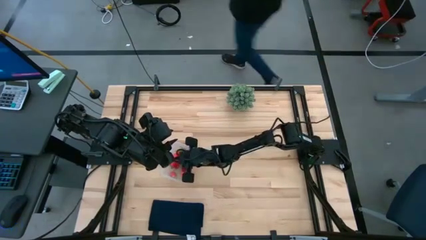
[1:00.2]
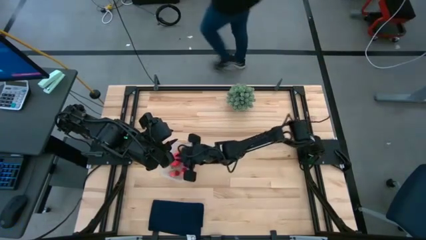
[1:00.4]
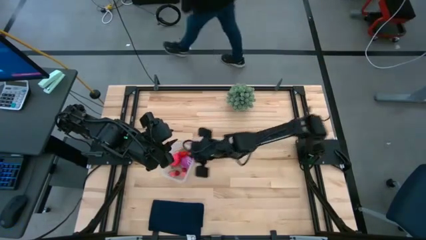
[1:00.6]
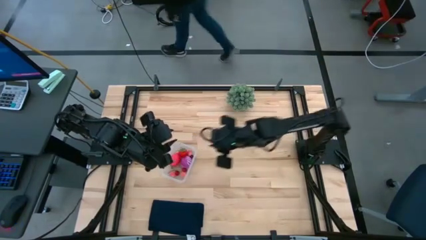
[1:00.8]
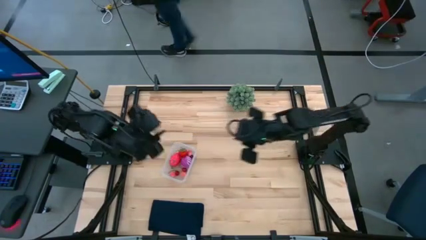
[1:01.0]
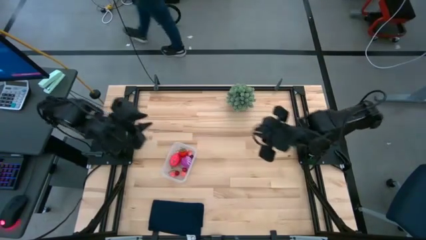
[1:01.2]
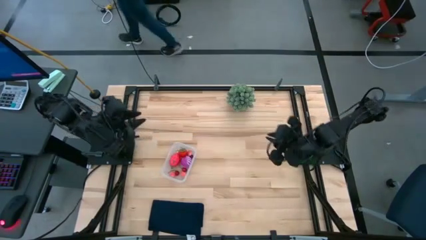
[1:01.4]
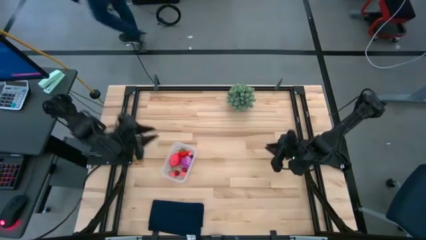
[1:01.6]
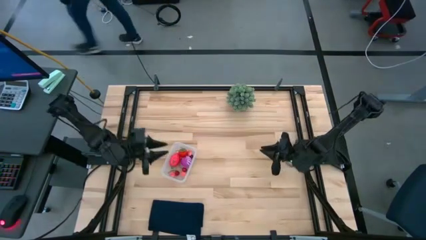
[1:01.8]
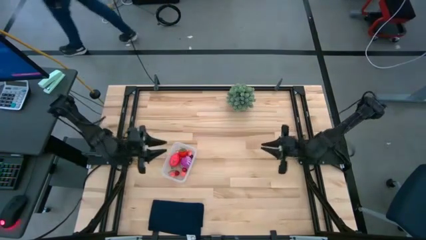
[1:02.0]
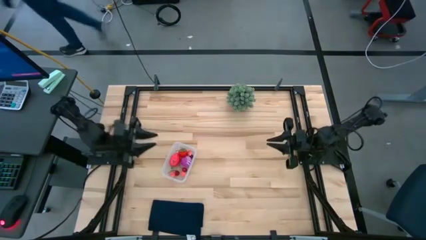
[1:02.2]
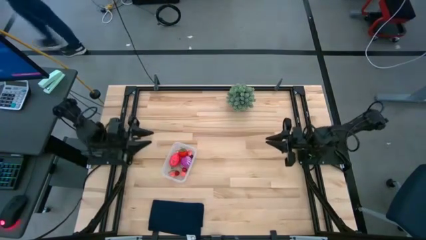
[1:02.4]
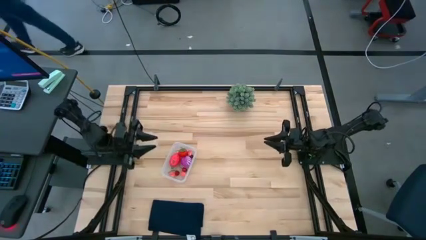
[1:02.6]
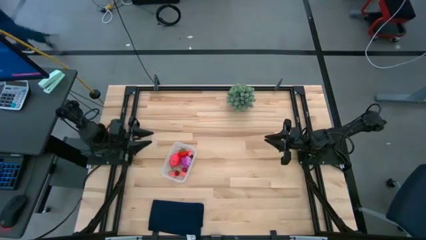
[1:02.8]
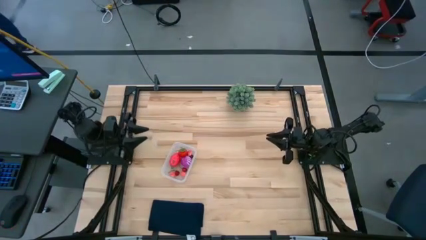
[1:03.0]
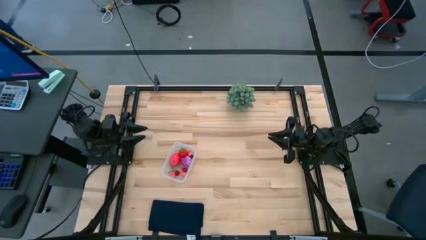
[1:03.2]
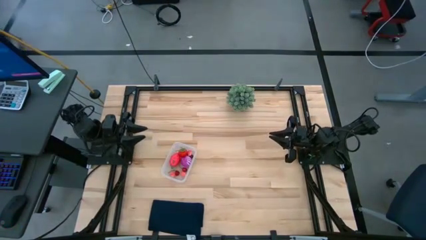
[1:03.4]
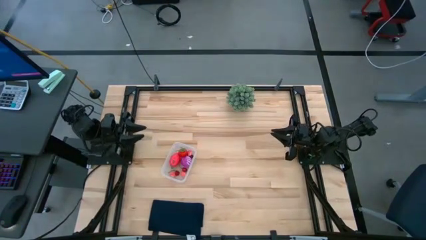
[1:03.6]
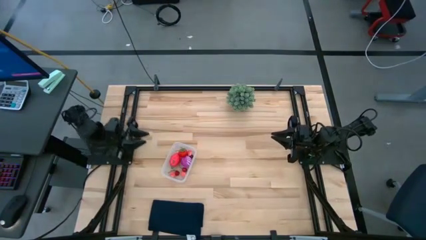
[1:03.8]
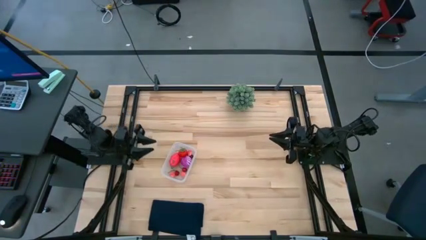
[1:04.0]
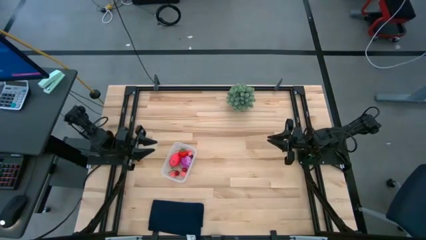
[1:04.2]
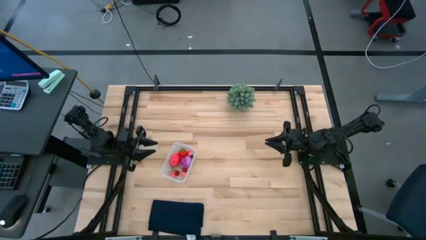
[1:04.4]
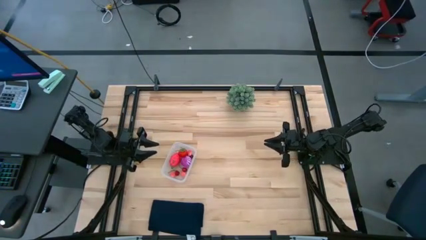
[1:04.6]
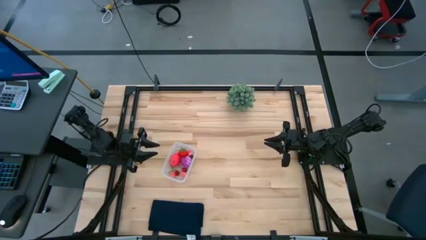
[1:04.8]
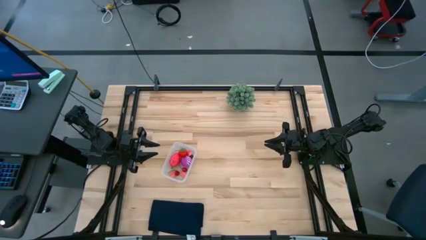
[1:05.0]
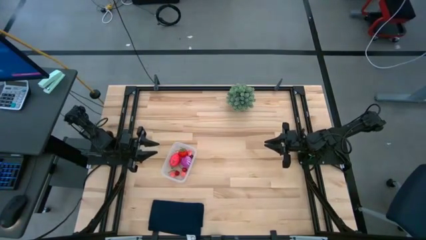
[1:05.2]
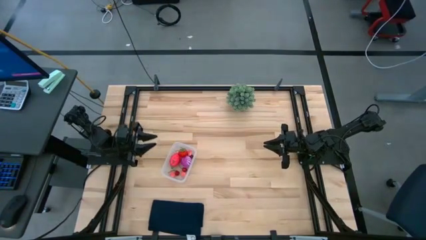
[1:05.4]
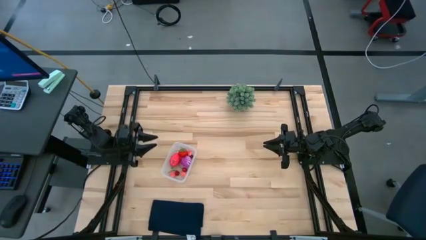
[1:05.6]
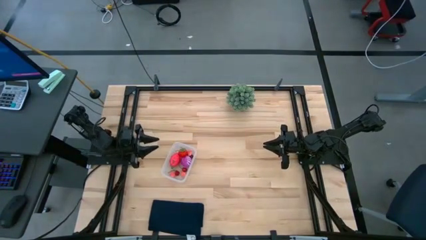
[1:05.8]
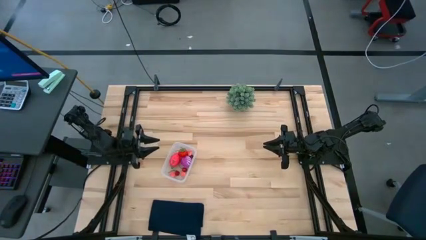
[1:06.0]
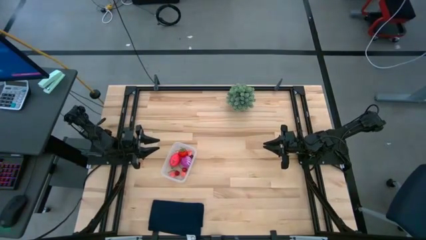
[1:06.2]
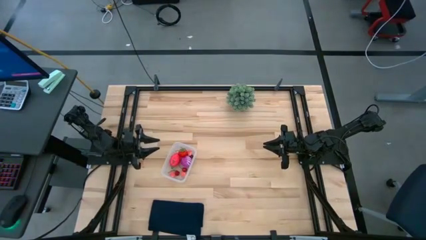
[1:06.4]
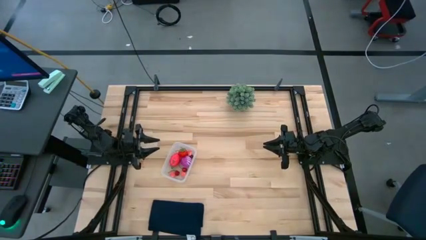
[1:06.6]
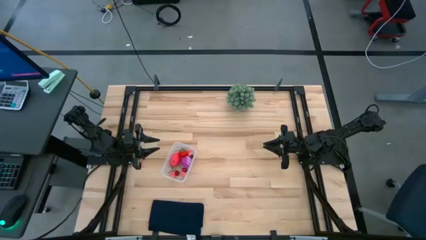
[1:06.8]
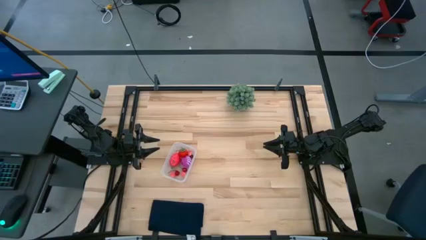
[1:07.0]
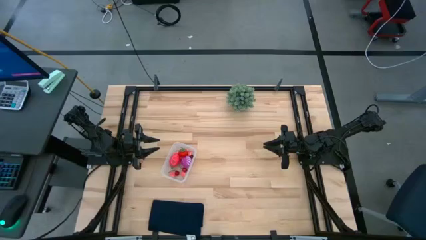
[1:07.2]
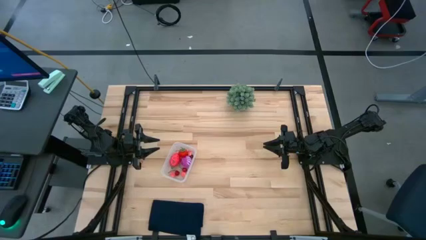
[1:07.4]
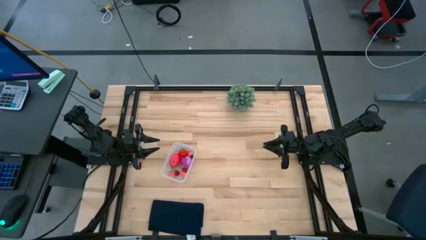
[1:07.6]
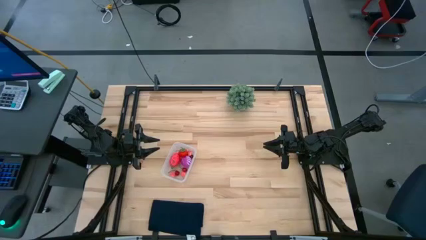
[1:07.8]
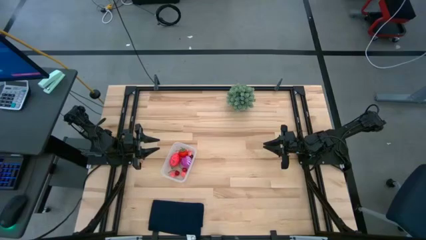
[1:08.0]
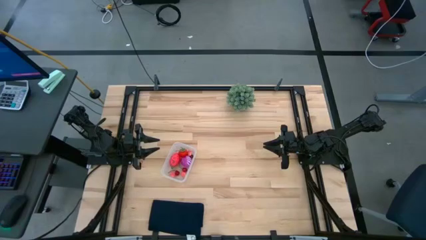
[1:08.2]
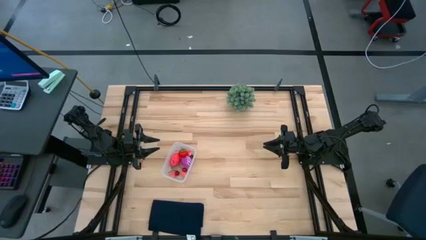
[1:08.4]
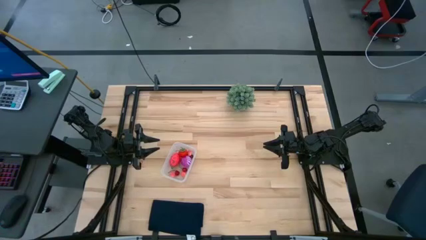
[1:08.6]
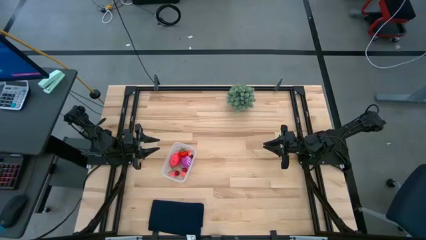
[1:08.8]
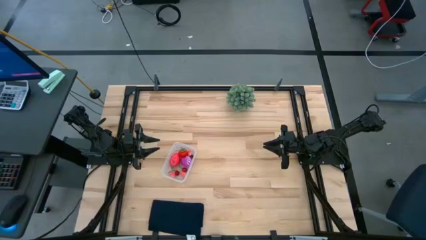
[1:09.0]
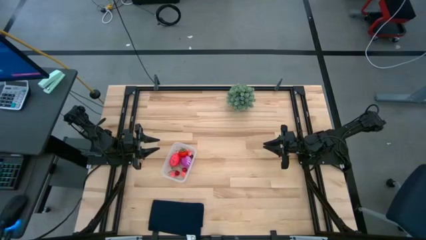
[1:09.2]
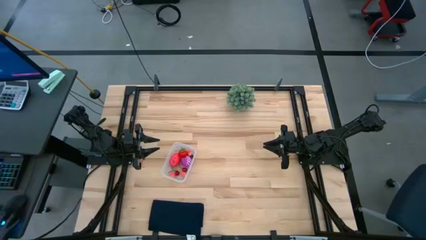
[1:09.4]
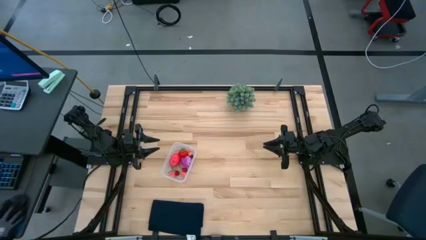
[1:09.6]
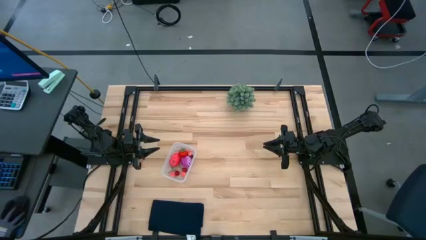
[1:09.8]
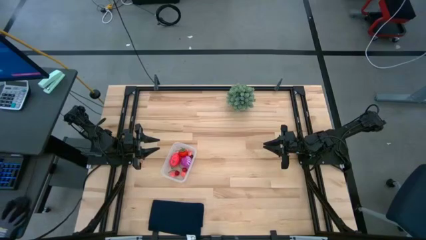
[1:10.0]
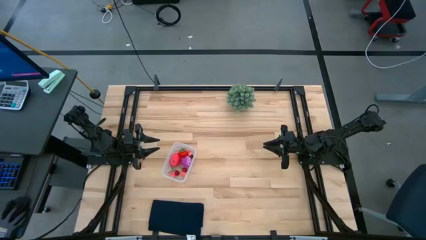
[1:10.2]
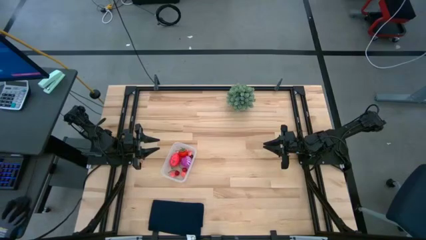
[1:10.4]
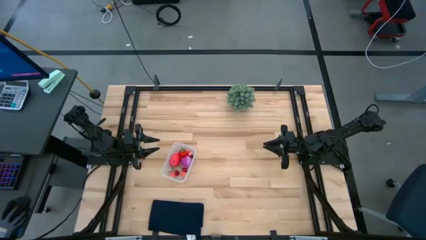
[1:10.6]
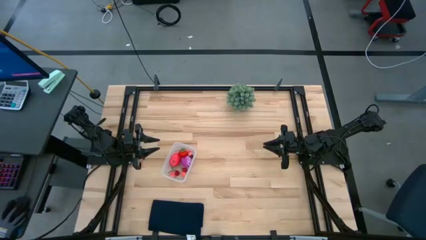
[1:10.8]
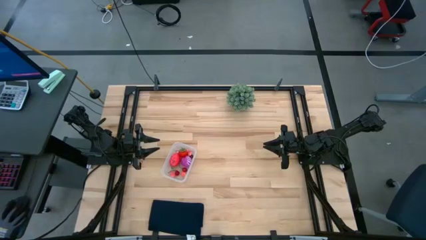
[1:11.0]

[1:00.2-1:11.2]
Task: Pick and placing Produce into tupperware
Return to Home Position
